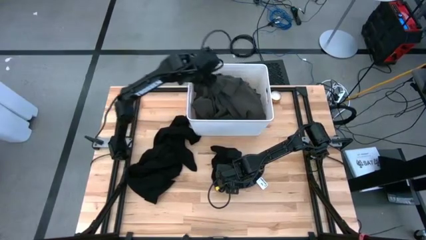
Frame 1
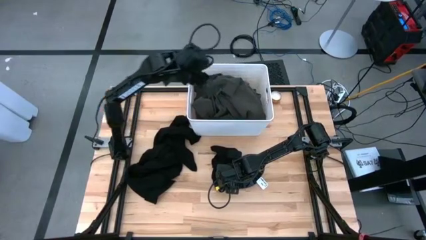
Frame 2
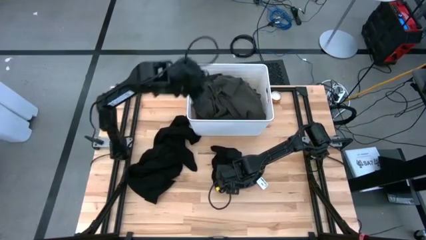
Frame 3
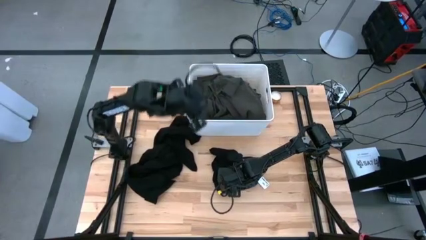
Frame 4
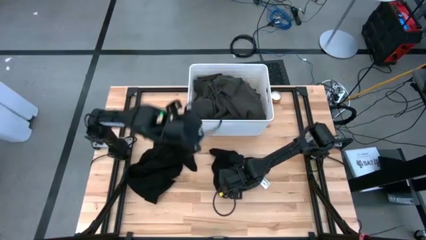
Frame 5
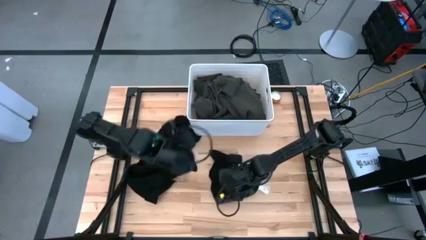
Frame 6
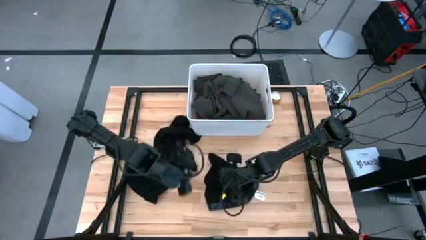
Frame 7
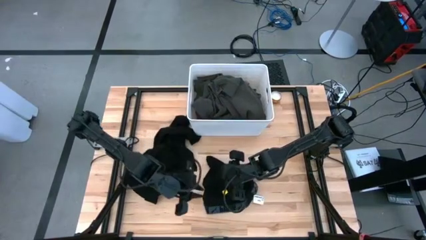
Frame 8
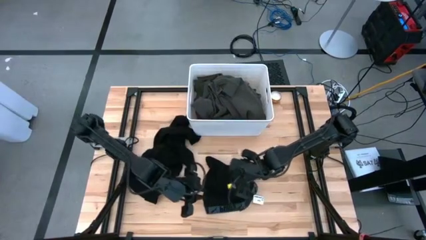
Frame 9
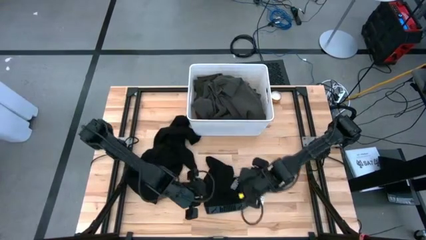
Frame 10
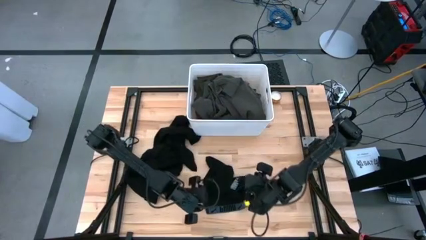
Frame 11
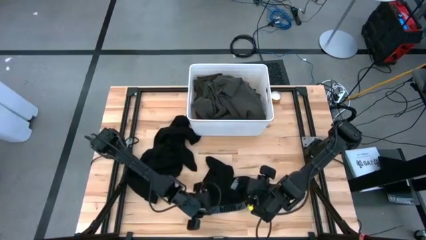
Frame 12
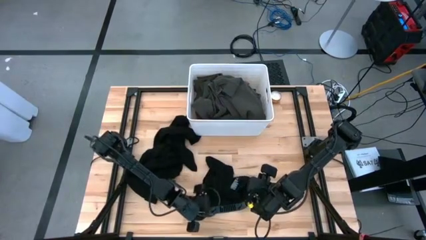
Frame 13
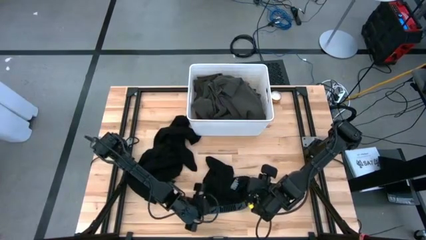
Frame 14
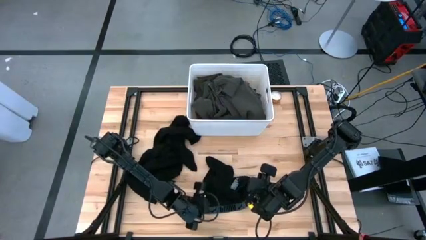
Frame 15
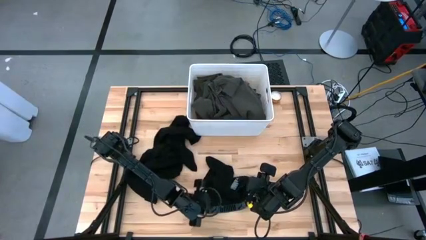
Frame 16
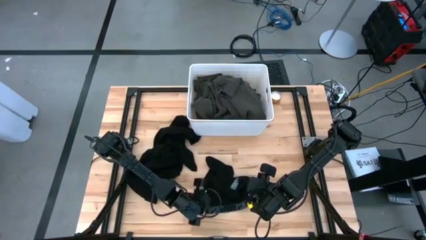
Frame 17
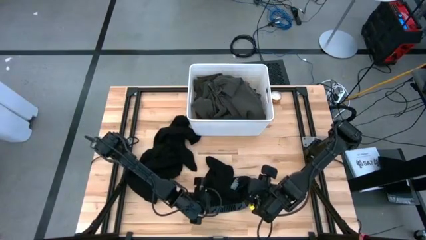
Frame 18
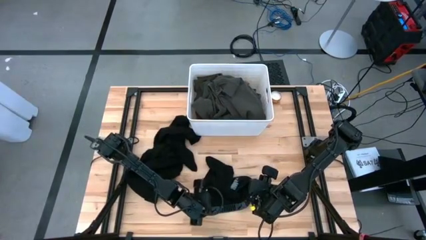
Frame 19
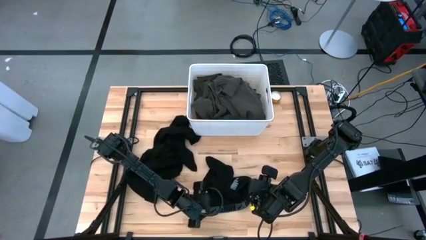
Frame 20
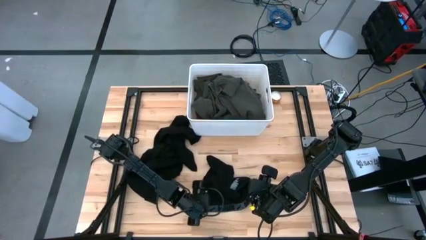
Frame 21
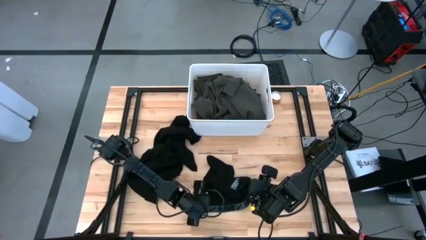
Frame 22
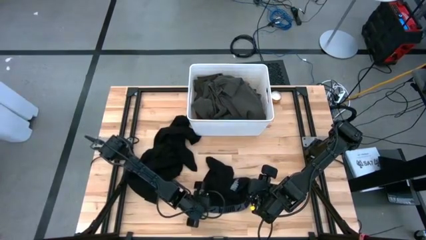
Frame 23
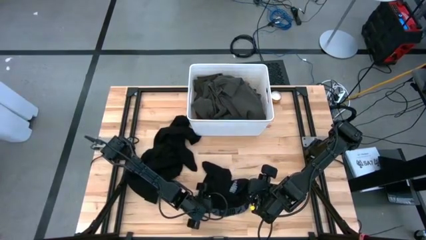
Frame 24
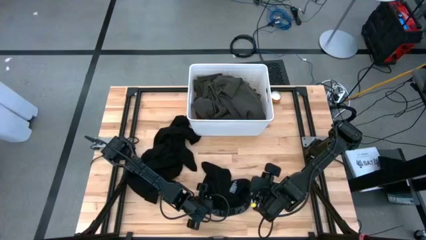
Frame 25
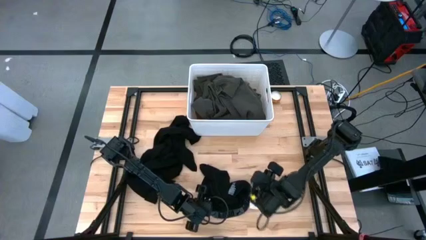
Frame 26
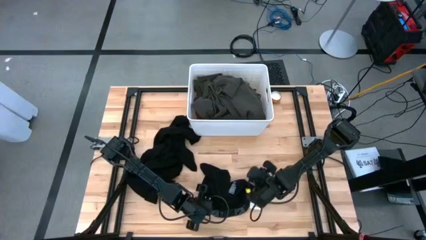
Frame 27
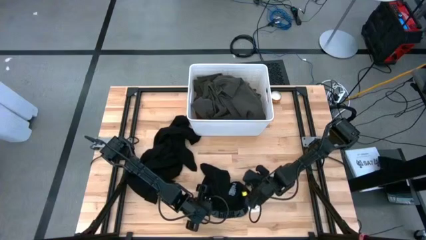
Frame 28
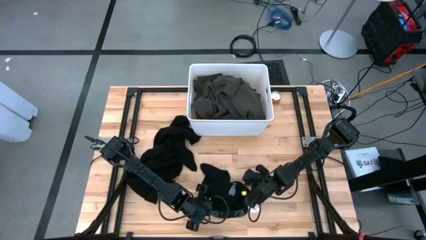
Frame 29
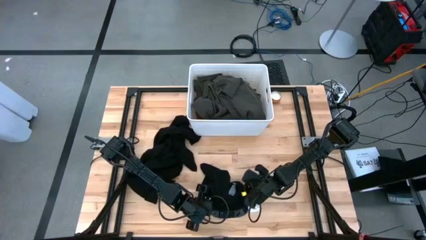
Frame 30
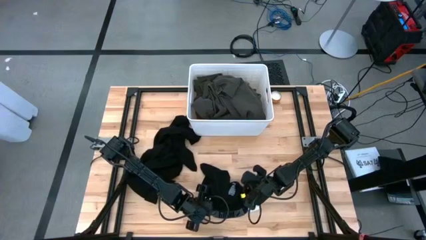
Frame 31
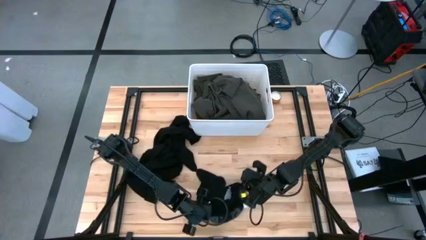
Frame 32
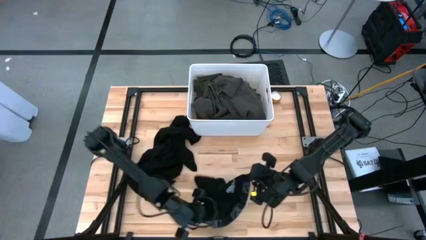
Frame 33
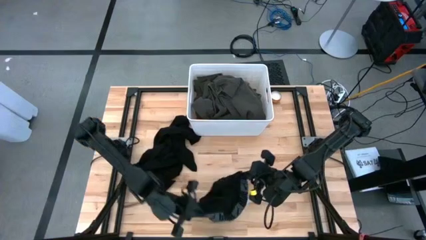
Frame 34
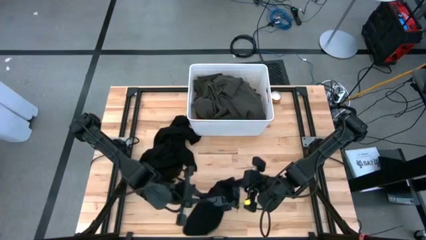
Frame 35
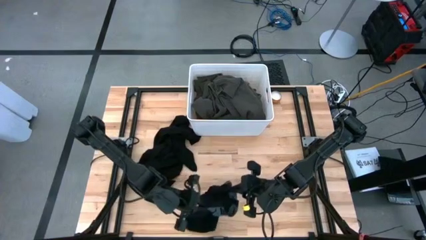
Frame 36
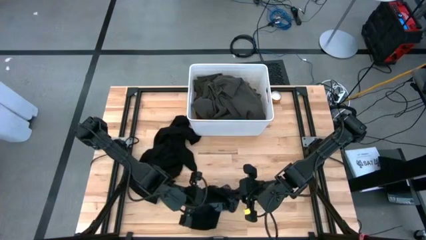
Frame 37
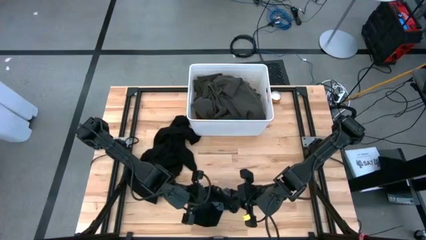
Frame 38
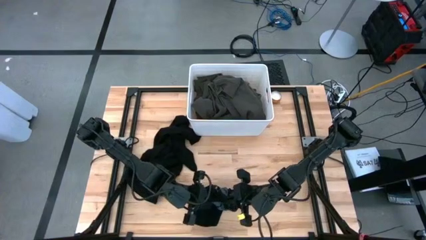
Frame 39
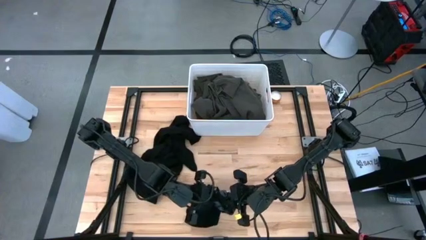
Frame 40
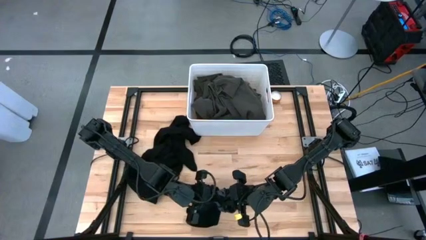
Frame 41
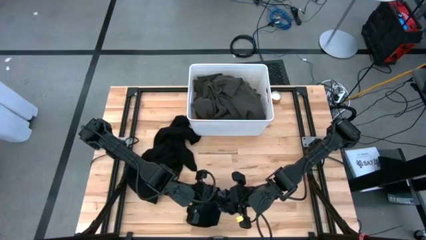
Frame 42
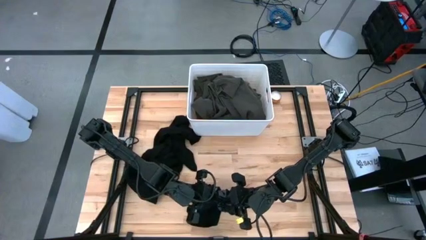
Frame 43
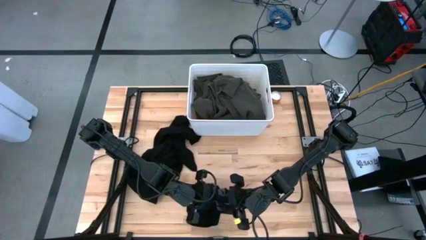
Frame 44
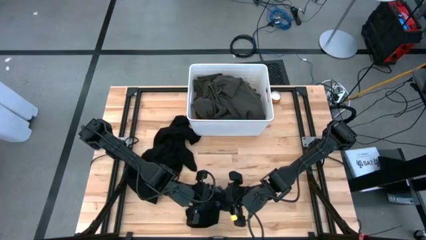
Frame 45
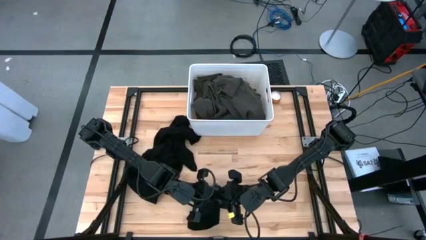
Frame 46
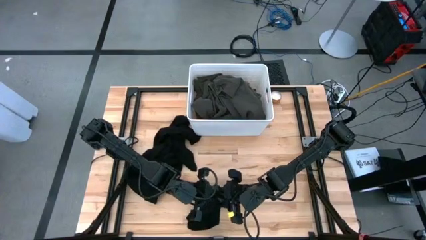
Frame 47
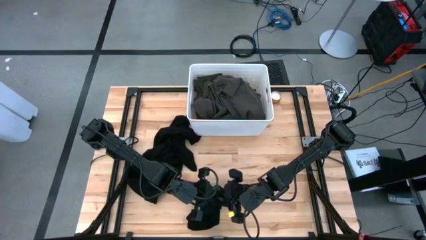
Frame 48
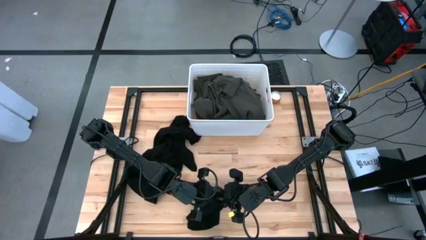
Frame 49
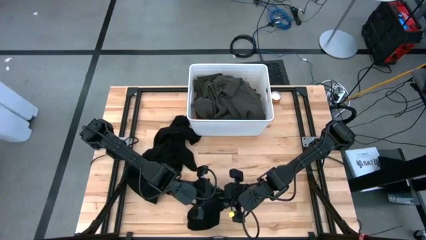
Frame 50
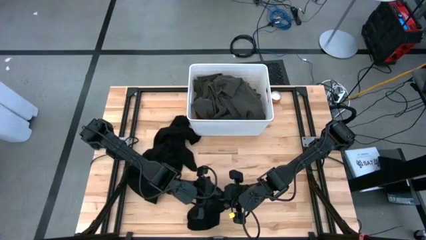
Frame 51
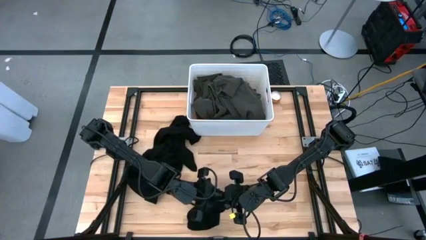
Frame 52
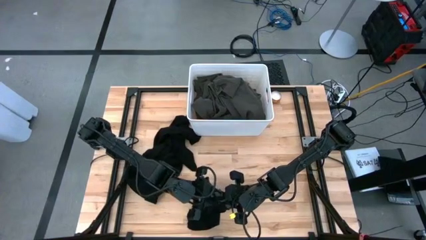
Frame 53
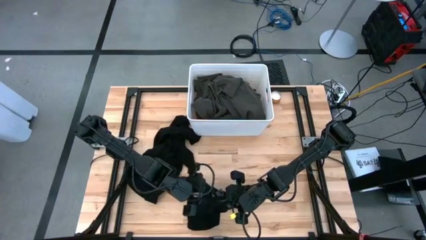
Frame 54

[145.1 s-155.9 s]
Task: Sort clothes
Put the black boxer into the white bin

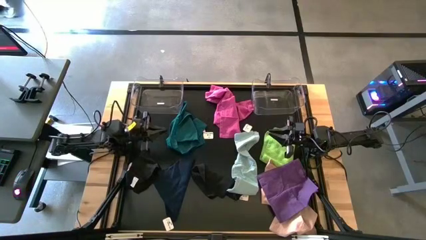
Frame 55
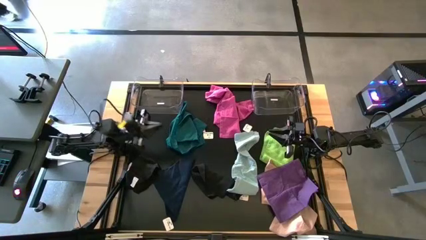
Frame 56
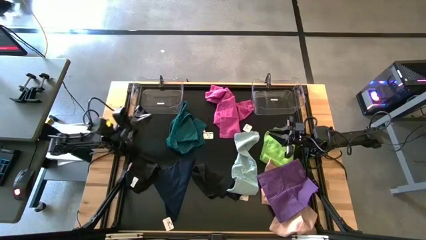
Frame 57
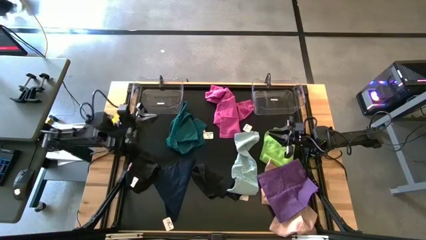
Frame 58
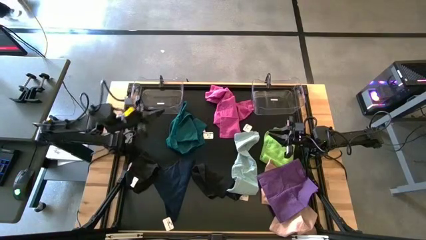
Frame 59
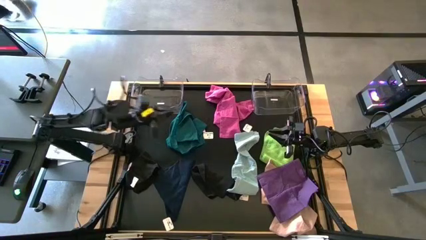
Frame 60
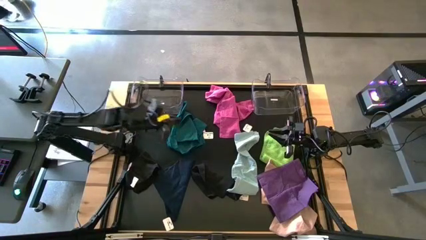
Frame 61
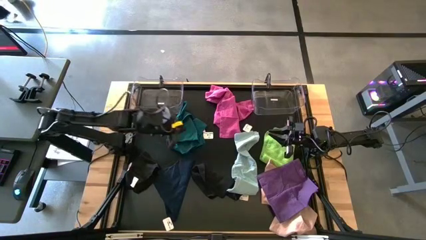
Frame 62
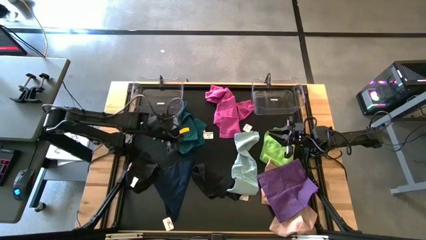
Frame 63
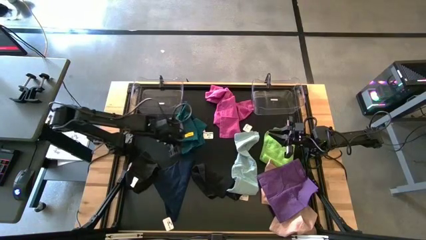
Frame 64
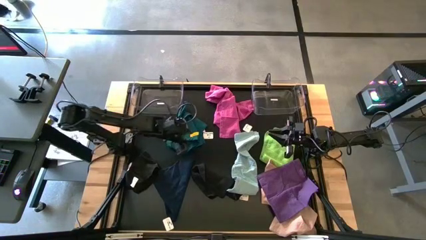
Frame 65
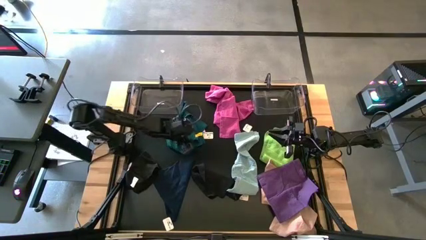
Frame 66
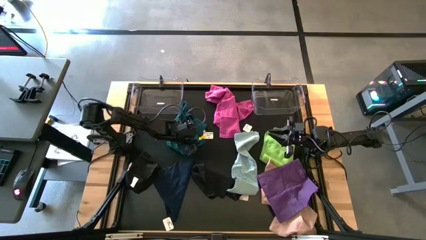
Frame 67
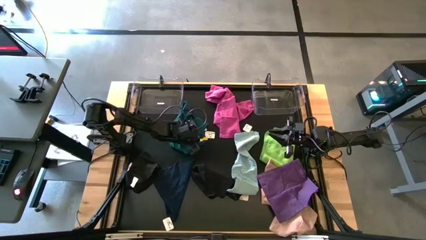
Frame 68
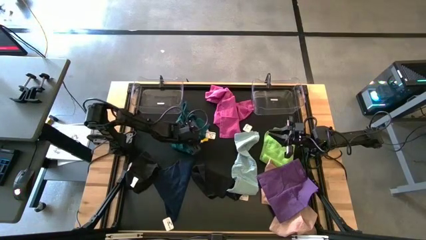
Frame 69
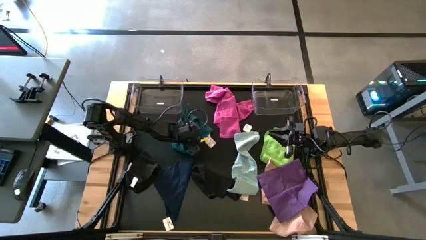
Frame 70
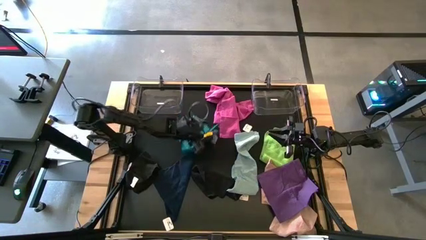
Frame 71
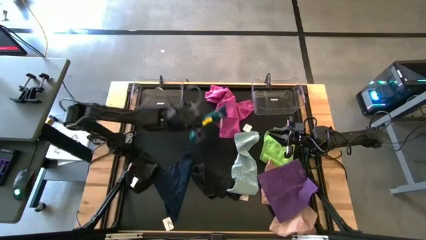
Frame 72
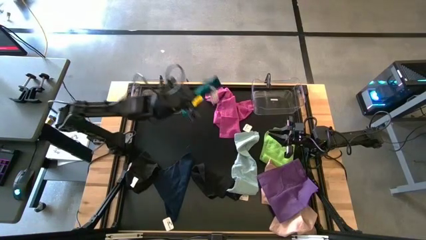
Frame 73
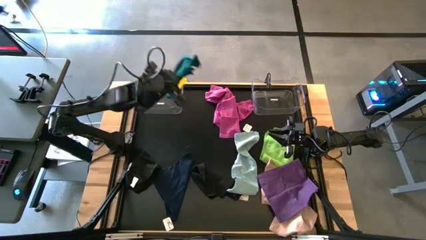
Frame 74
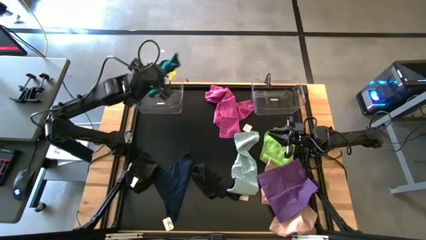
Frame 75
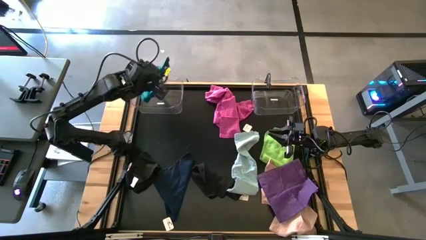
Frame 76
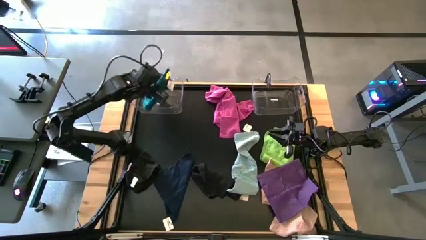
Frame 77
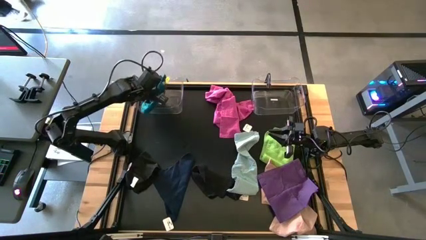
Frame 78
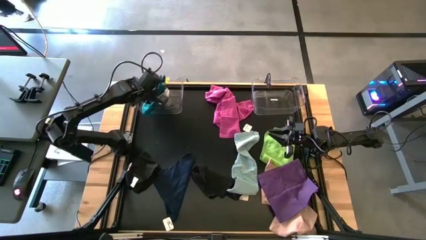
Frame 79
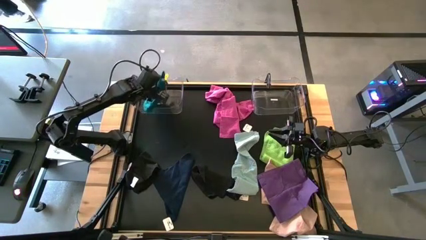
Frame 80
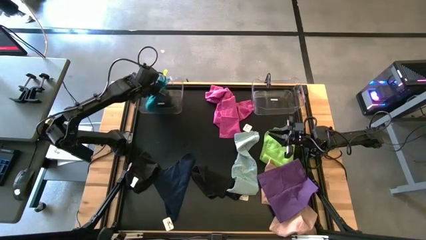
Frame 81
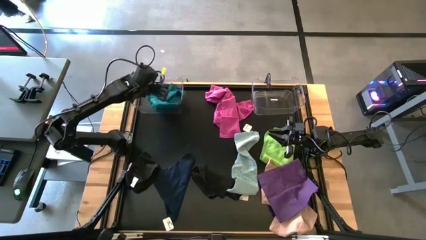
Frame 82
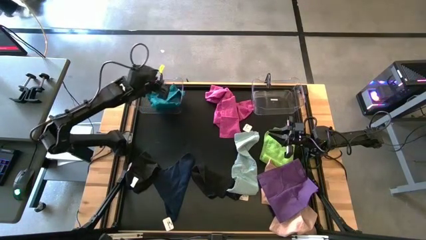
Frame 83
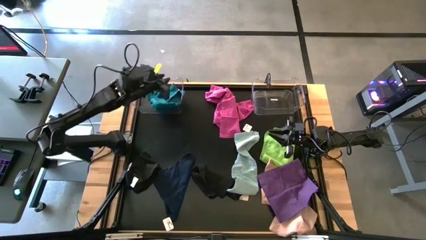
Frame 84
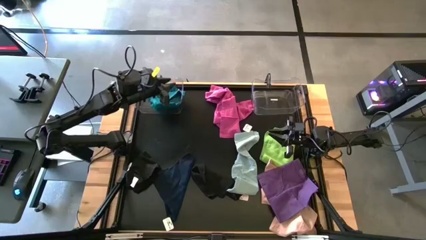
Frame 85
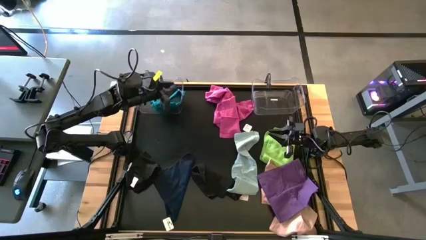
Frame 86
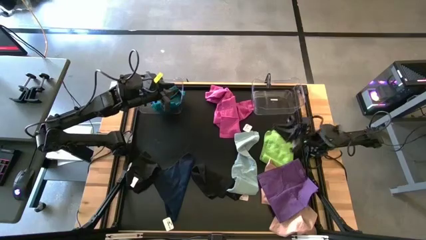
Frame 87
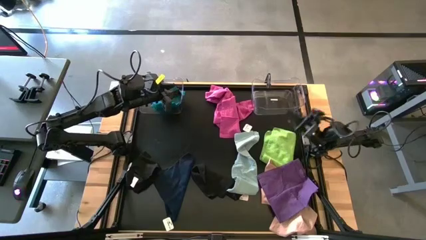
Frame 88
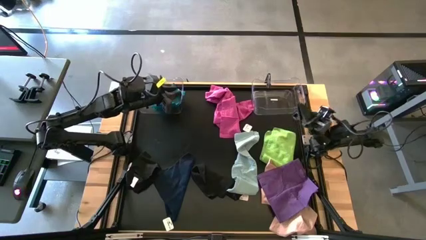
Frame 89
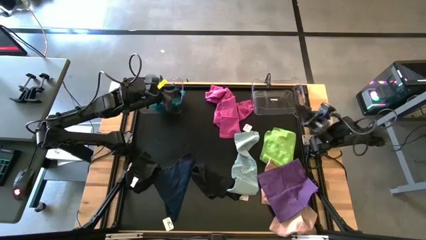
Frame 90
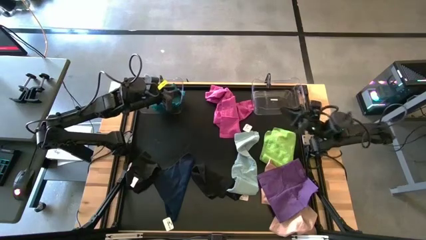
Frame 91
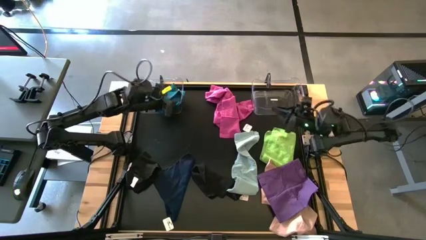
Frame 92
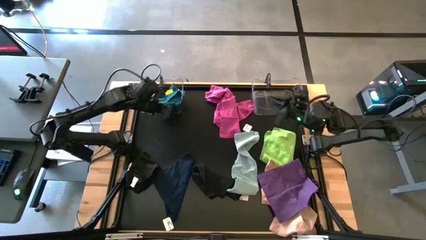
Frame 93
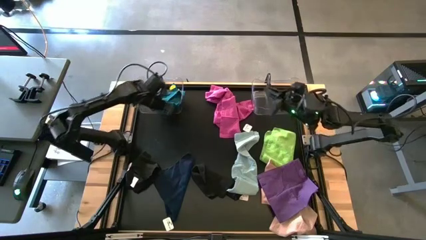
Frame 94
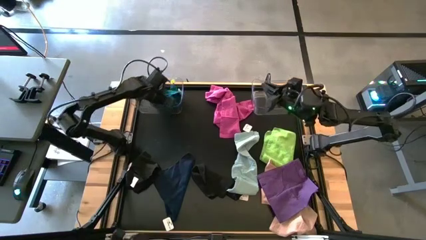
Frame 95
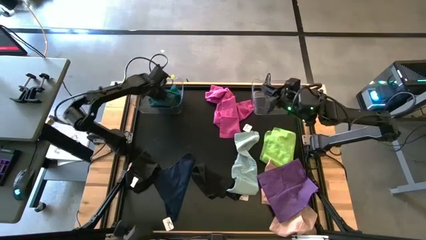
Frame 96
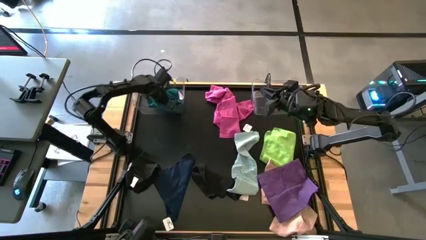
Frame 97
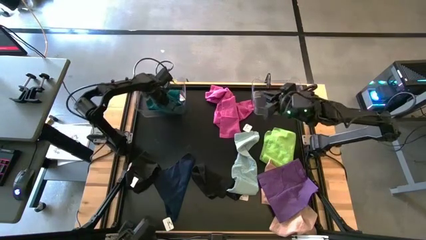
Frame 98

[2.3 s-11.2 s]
Task: Sort towels by color in basket
Put the blue kitchen towel into the left transparent bin
